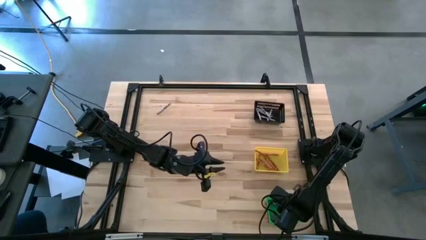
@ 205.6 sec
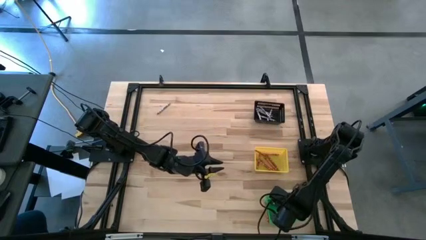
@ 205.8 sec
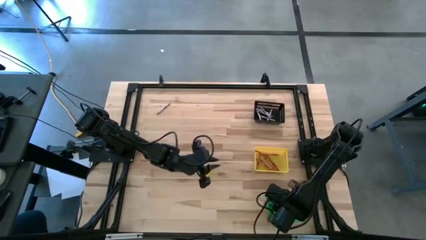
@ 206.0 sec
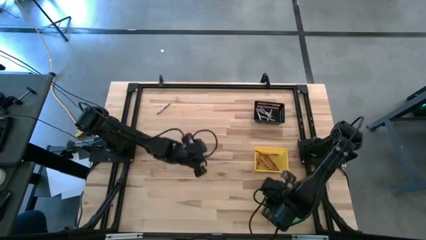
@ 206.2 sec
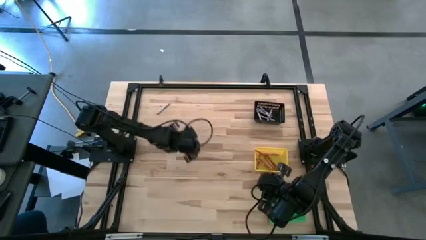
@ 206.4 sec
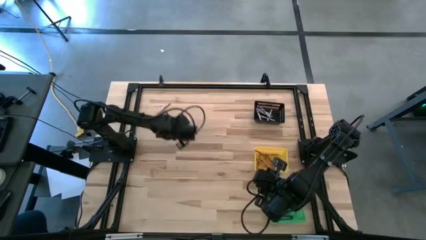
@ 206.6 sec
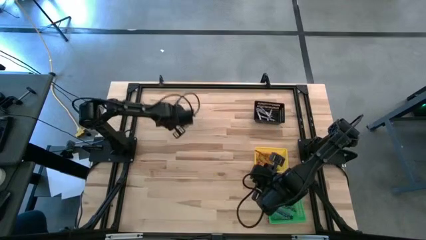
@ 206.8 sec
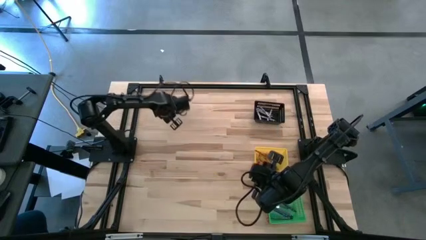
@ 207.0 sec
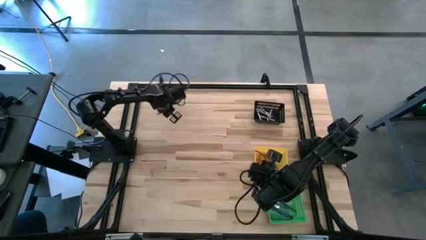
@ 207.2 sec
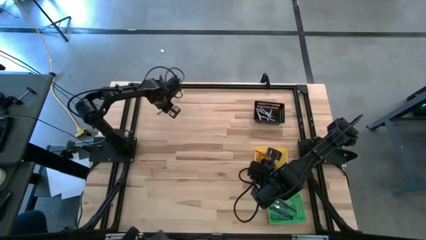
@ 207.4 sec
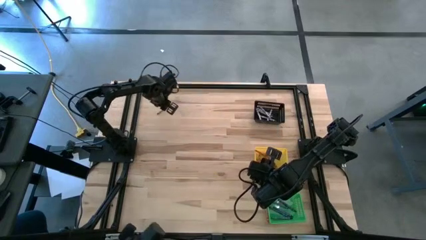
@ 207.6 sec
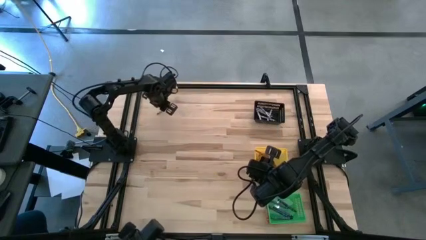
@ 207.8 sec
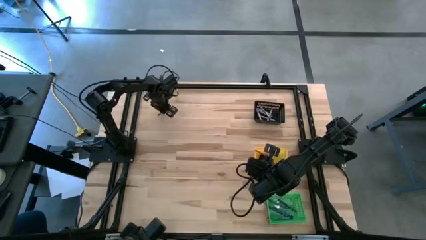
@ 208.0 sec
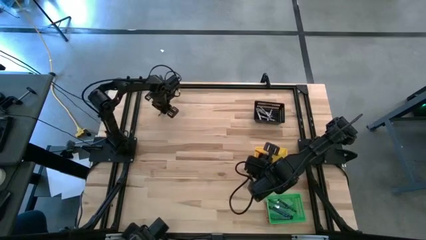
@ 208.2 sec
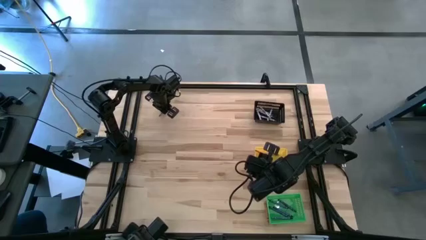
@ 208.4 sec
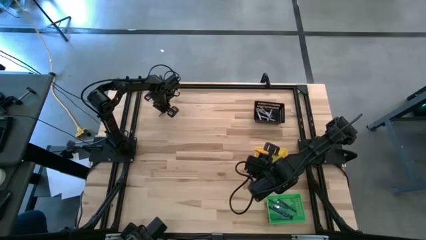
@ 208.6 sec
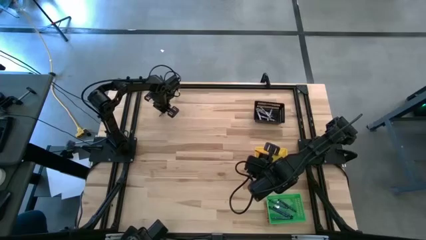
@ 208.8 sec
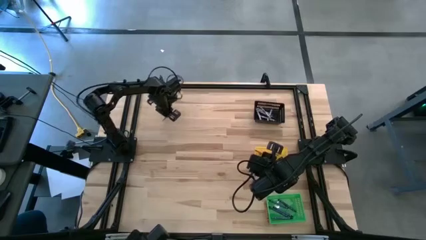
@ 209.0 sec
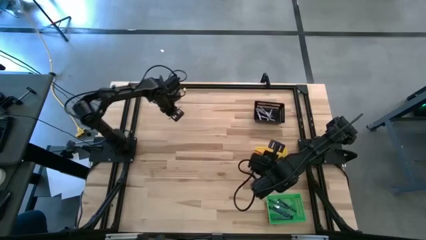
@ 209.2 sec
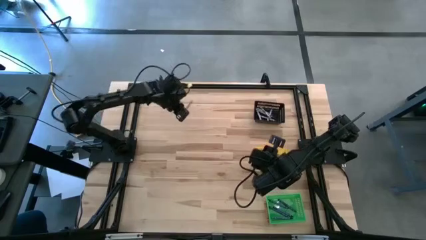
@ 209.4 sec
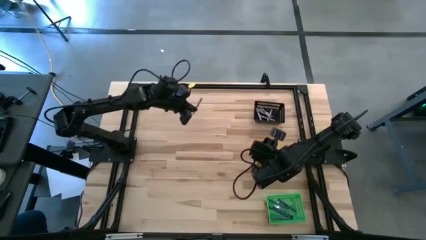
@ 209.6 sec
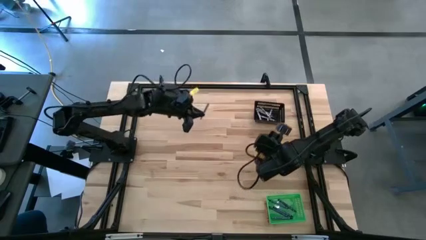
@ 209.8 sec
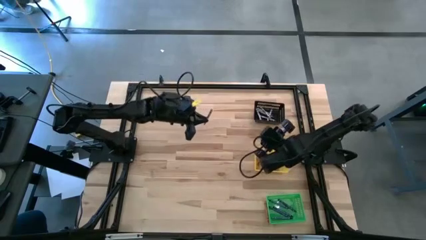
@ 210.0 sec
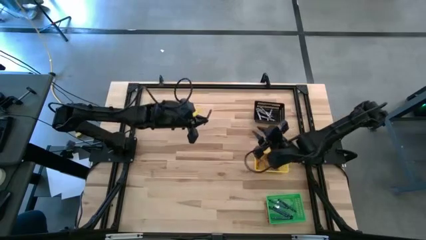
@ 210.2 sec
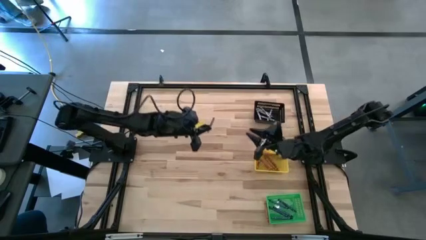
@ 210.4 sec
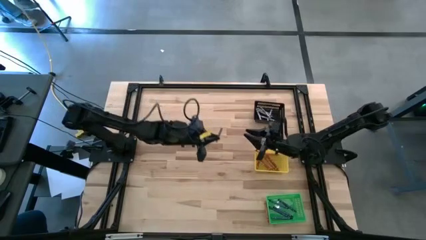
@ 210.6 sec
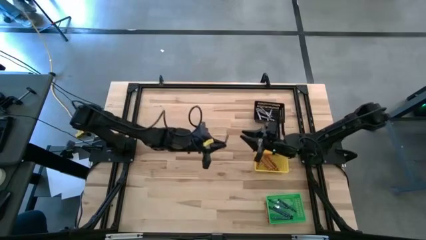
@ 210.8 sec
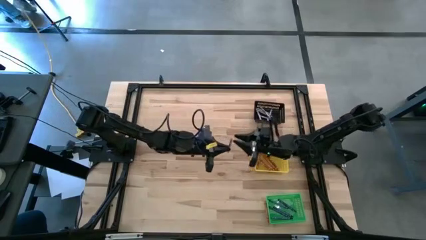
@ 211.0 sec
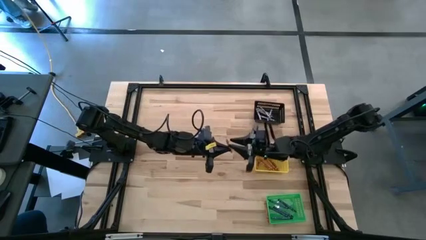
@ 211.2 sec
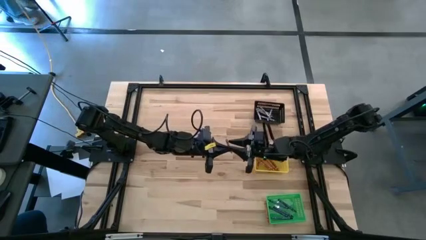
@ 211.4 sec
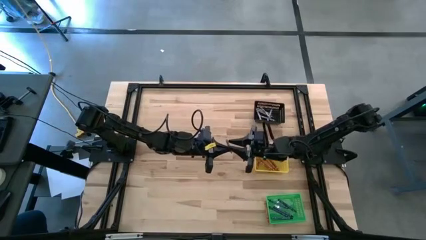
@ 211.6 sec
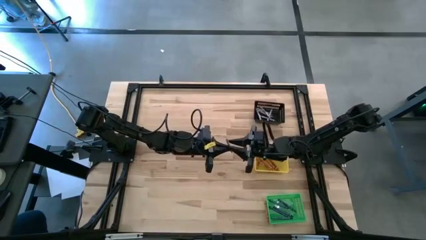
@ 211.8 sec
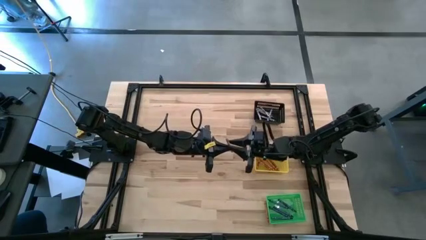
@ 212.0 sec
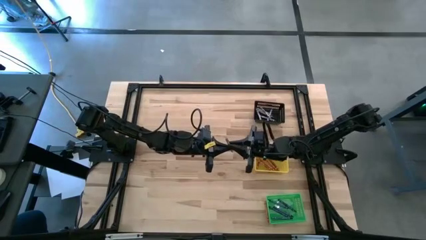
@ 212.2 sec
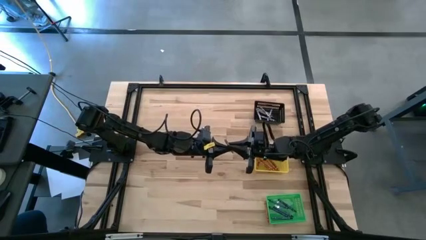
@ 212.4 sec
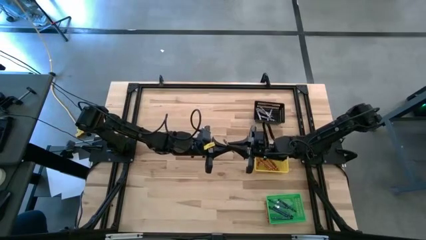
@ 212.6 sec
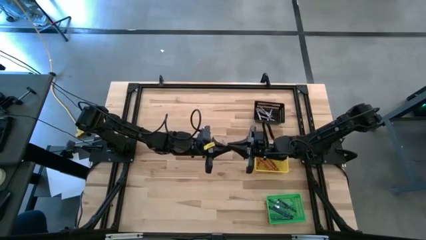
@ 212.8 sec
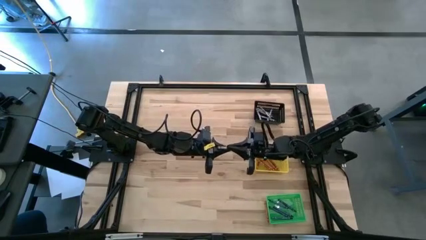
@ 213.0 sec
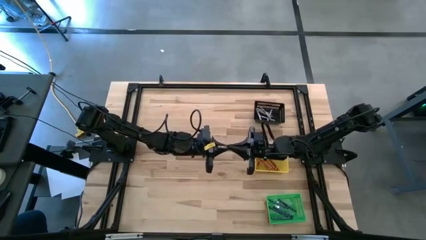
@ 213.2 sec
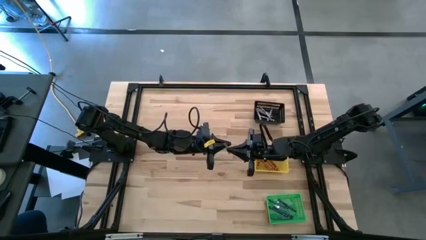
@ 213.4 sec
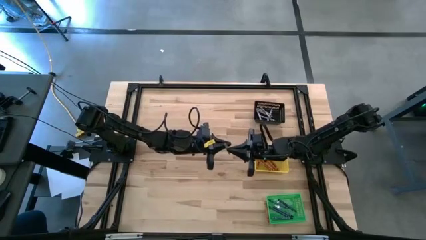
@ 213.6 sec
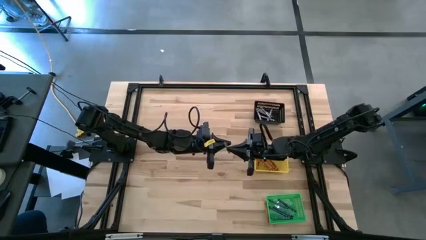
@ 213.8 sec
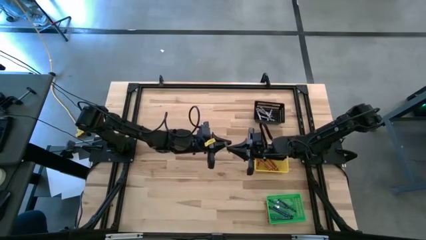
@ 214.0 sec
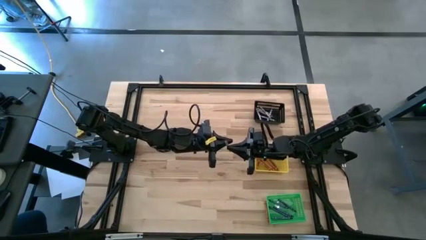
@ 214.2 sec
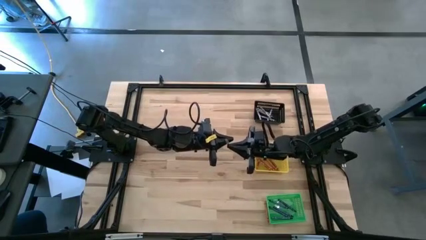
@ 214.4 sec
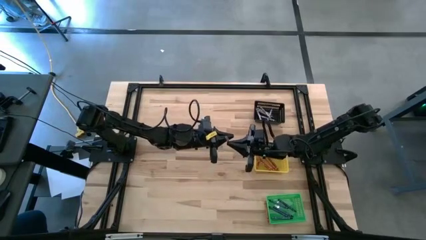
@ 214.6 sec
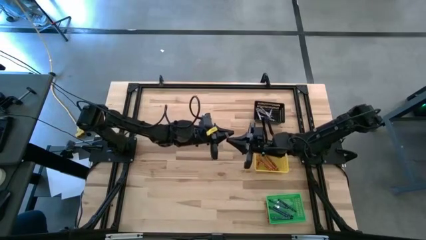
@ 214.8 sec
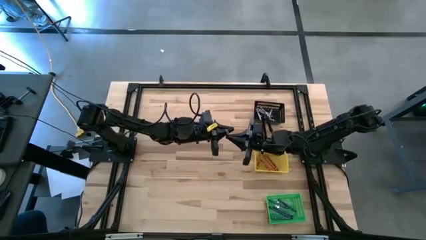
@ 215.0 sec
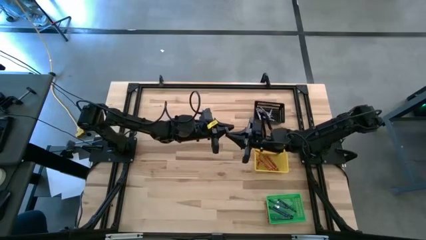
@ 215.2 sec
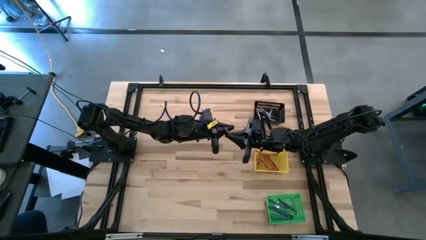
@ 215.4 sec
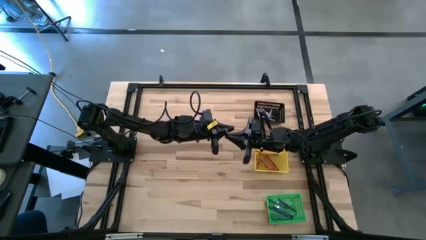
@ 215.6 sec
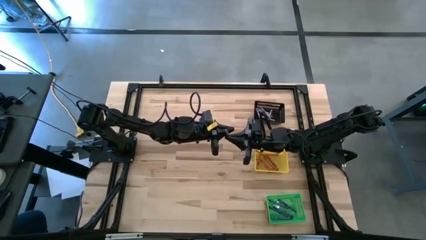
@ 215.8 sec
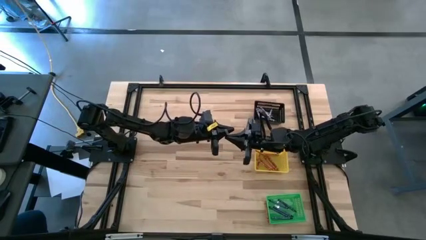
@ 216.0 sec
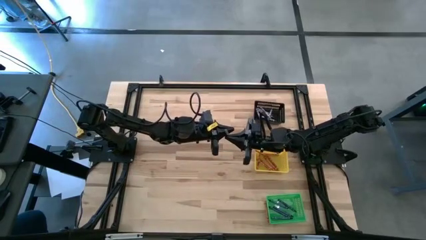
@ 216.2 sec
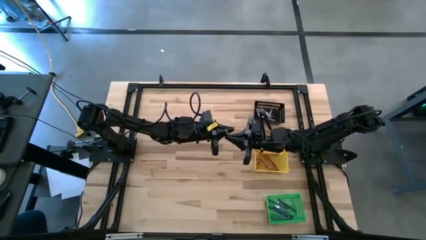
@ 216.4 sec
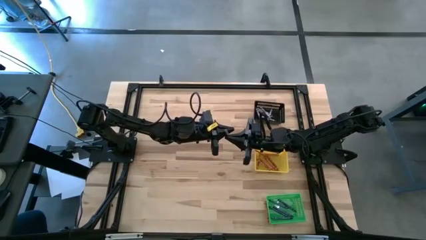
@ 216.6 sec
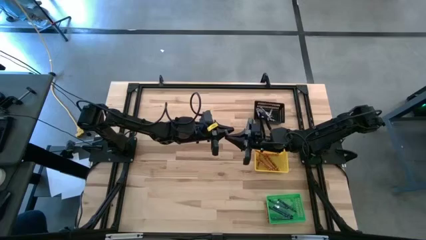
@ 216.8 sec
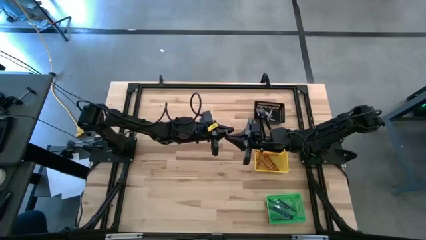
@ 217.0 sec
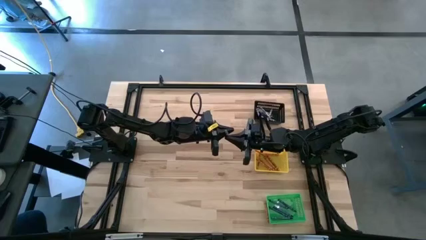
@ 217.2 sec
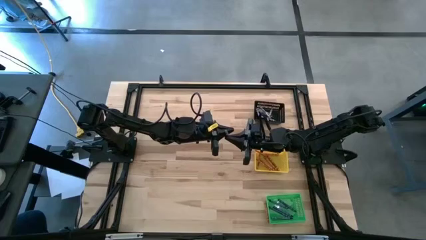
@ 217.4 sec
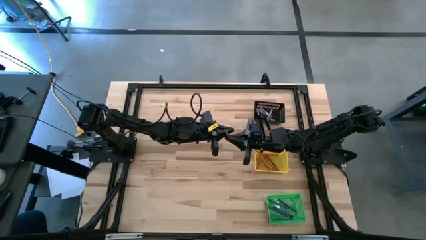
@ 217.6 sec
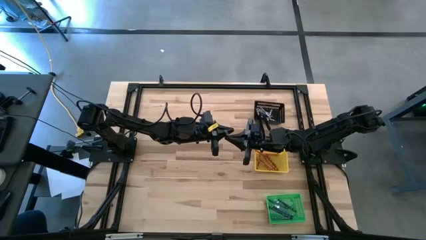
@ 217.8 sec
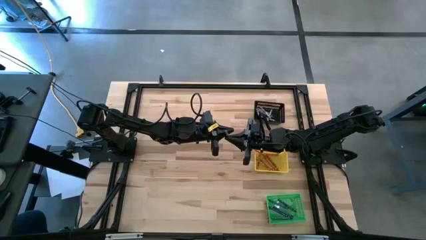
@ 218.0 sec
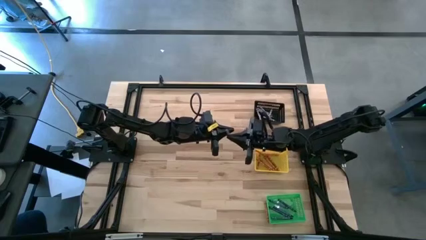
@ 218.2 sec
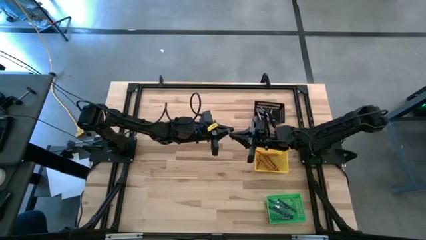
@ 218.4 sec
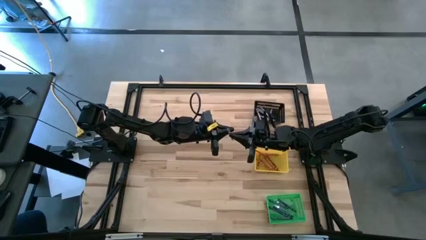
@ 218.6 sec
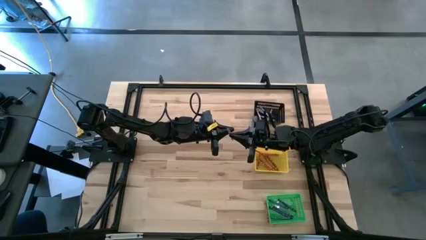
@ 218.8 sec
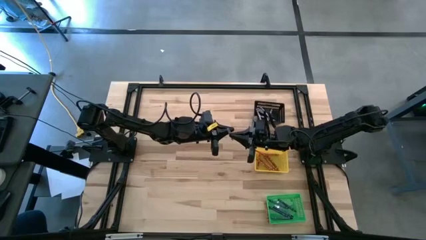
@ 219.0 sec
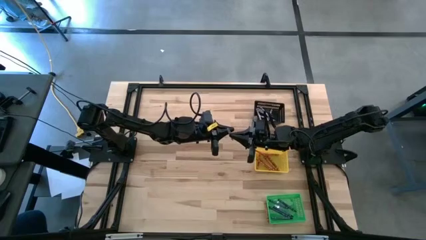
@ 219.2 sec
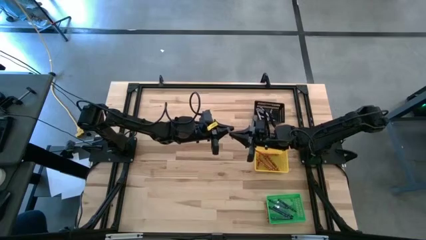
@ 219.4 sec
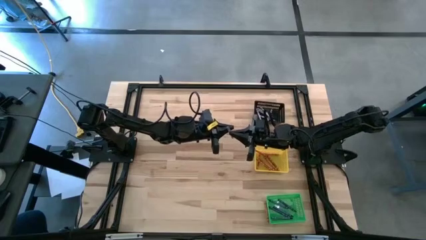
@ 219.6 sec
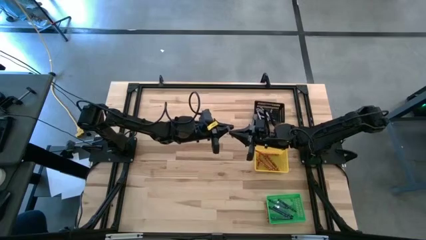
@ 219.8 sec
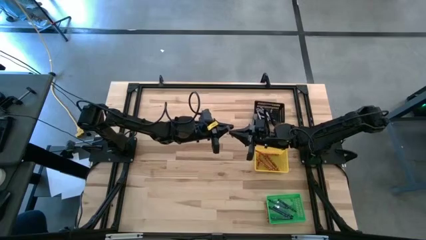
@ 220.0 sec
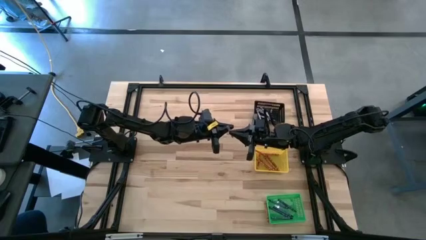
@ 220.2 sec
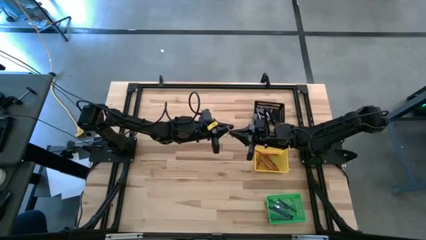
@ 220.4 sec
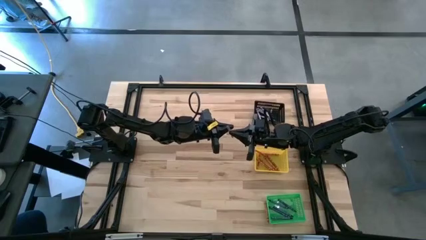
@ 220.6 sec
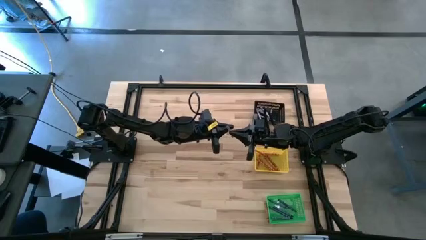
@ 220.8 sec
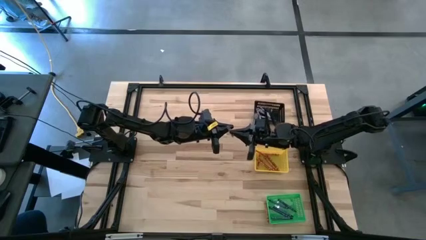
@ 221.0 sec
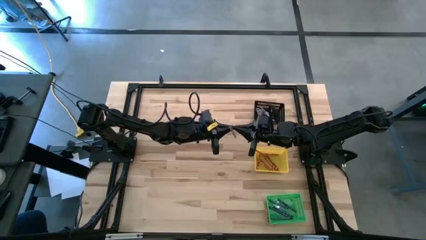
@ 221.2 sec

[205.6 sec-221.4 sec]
Task: Sort crayons
Put the gray crayon into the black basket

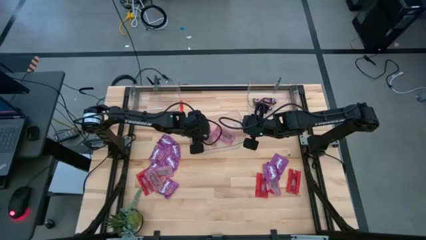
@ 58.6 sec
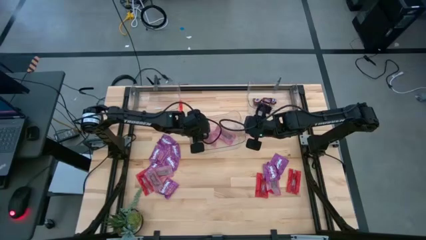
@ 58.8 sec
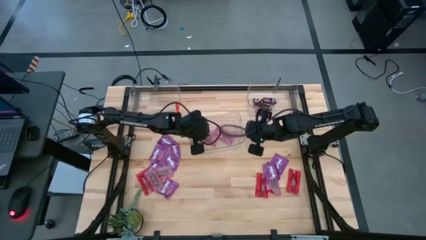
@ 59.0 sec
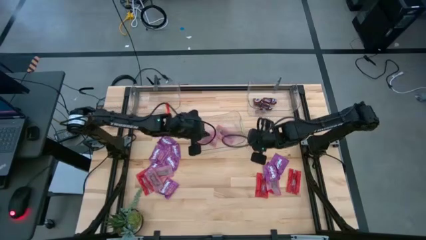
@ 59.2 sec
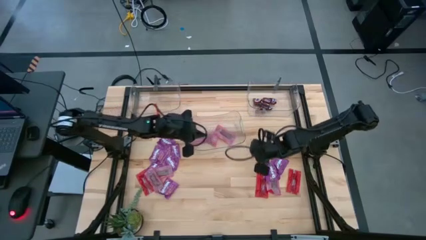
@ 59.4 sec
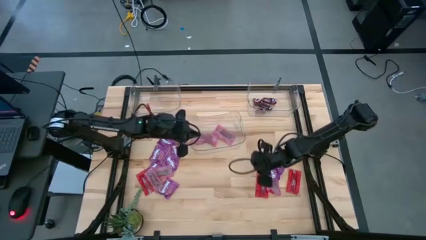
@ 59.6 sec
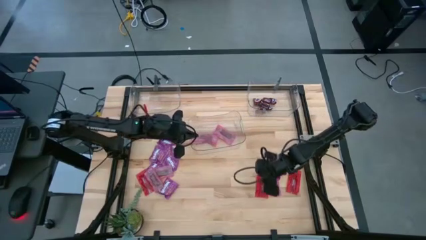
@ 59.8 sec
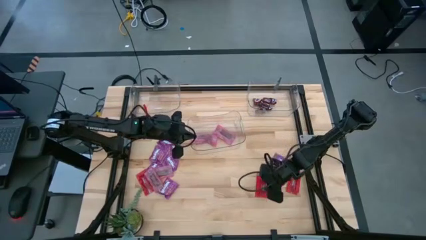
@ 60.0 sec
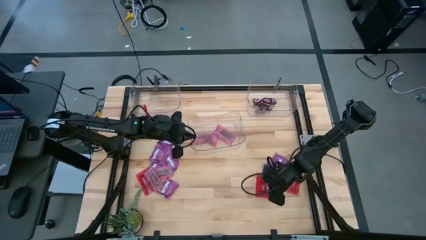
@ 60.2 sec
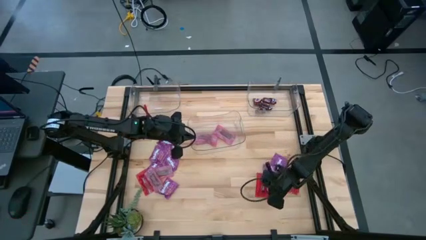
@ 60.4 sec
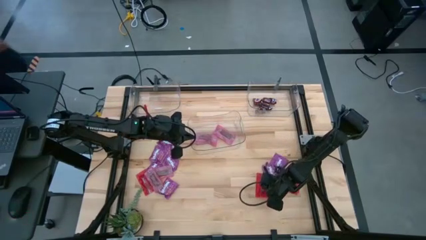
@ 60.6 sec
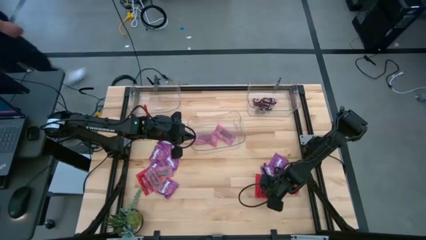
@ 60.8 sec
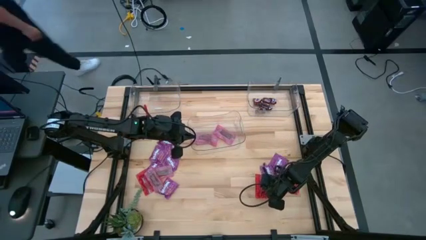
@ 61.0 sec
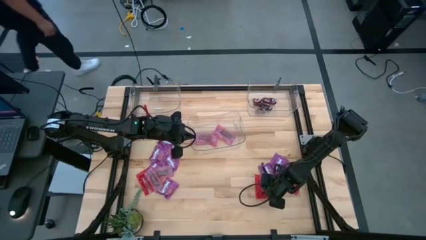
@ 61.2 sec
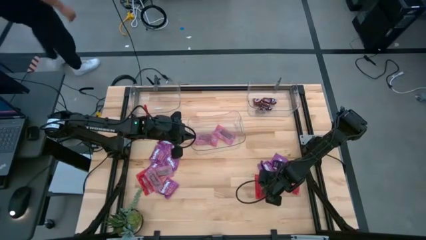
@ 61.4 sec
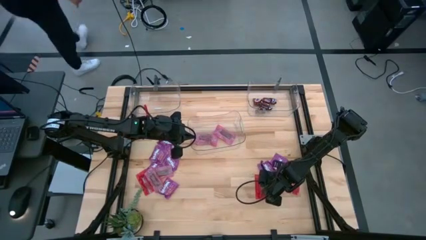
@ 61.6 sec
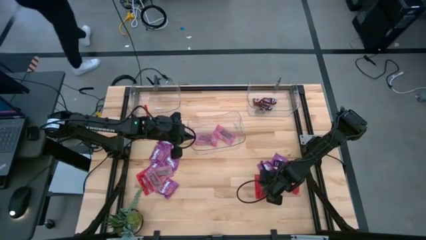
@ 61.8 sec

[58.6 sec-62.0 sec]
Task: Sort candy
Put the red candy pack into the bottom transparent bin
